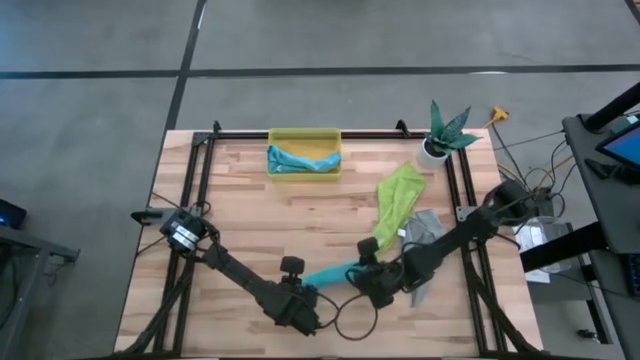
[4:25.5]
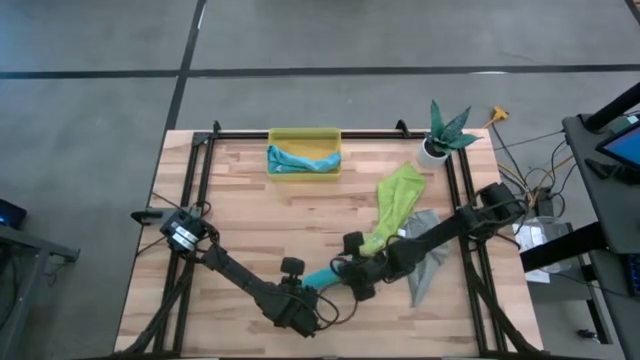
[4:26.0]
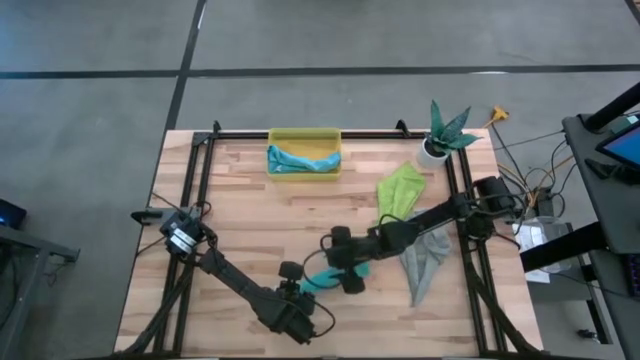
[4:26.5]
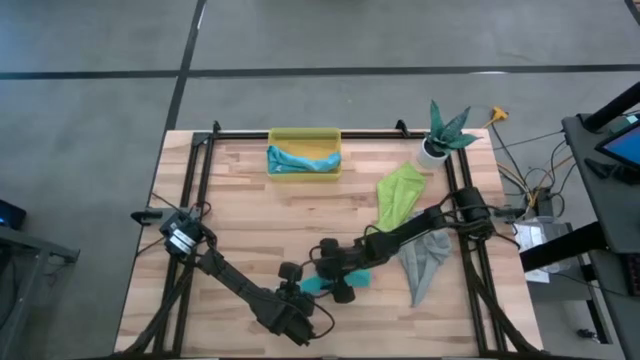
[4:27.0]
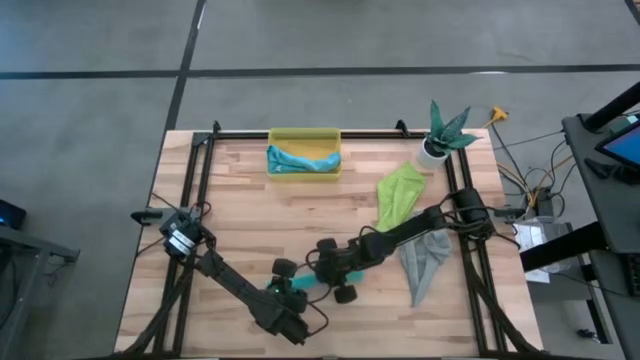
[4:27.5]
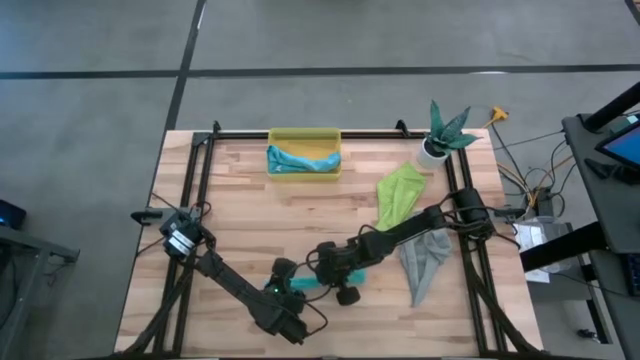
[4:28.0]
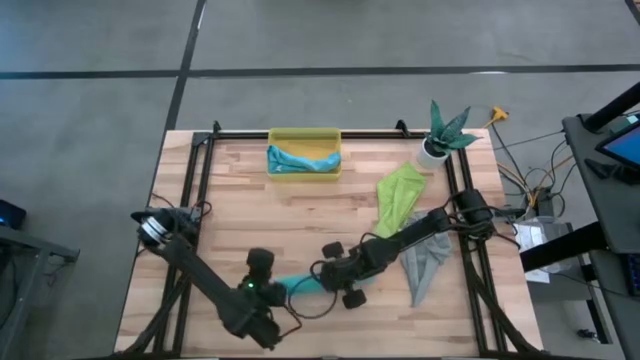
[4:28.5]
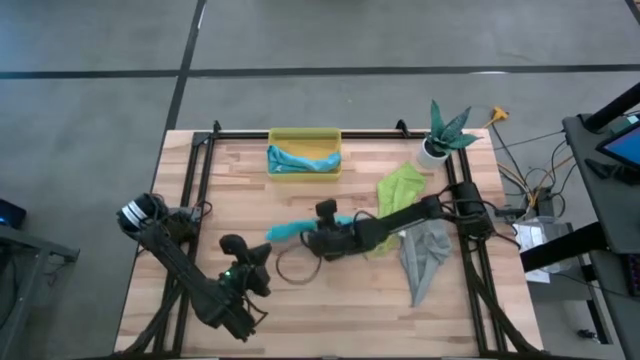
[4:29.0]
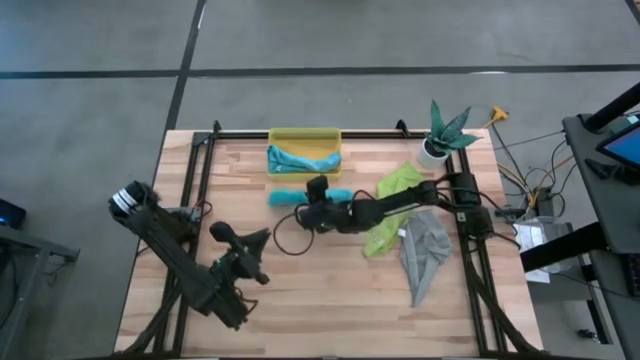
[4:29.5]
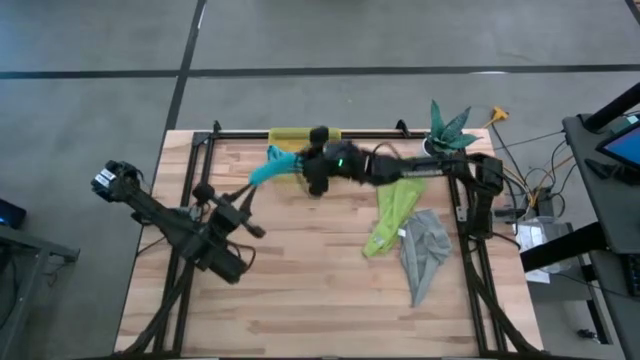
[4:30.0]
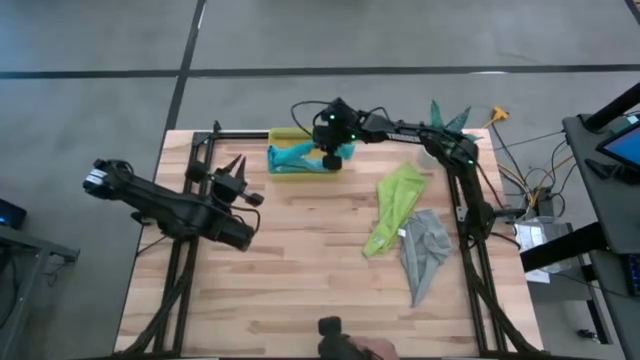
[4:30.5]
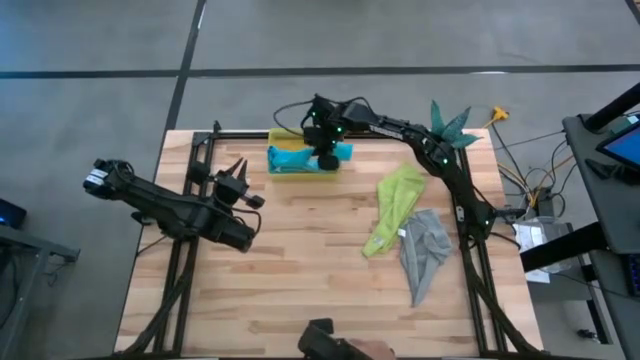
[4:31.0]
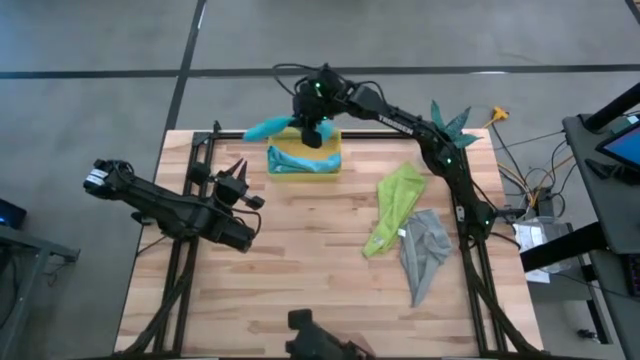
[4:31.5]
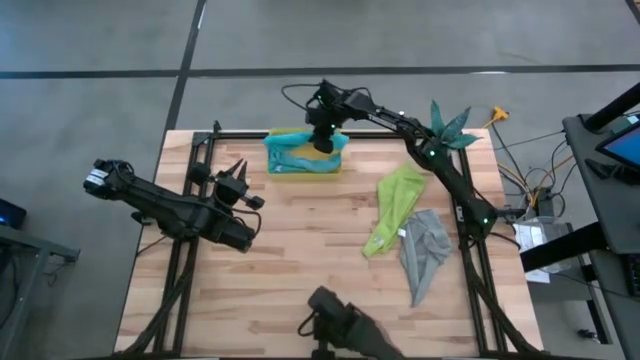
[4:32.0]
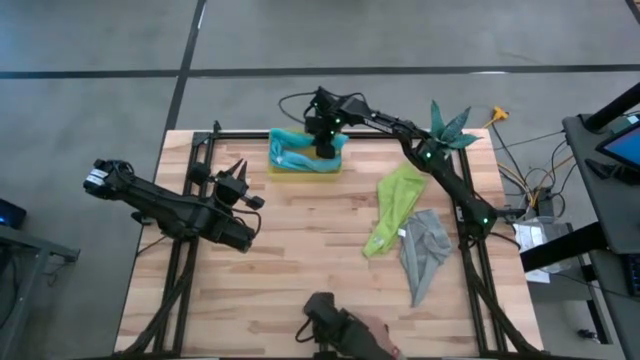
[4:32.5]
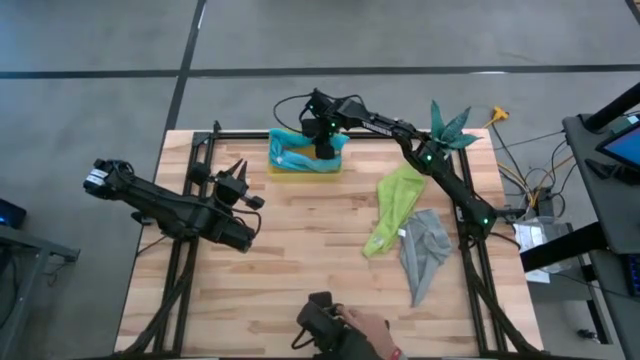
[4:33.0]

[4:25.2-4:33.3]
Task: Roll microfiber towels into tight, uniform cylinder then place into a basket
Put the rolled light blue towel into the yellow bin

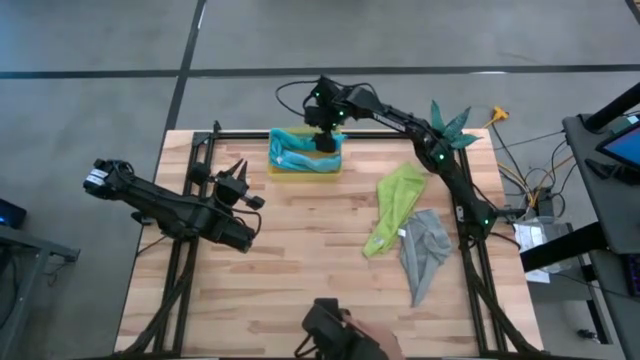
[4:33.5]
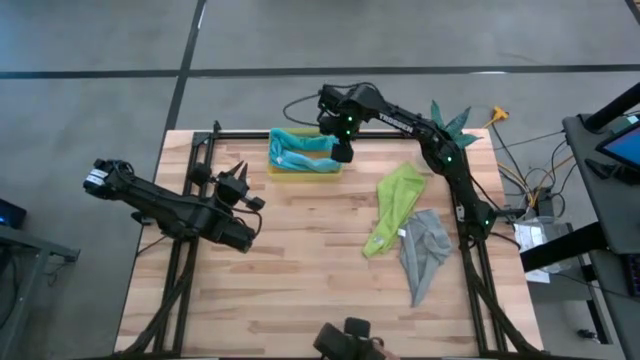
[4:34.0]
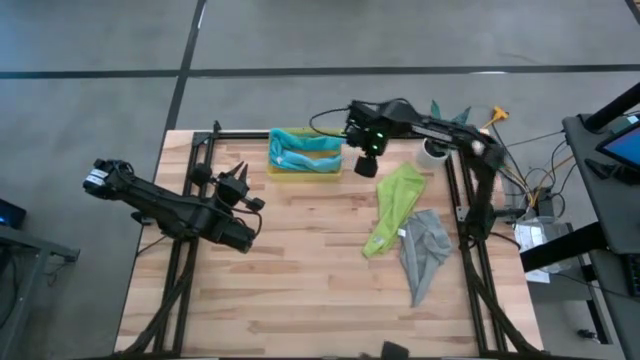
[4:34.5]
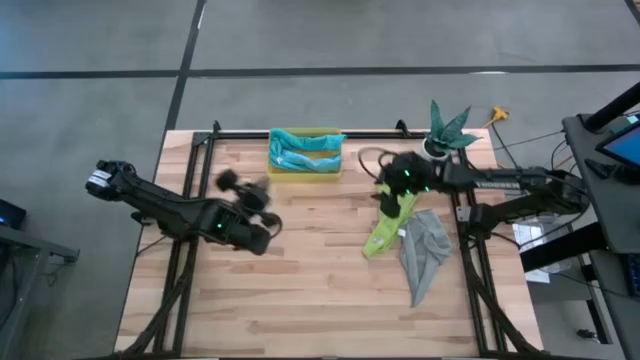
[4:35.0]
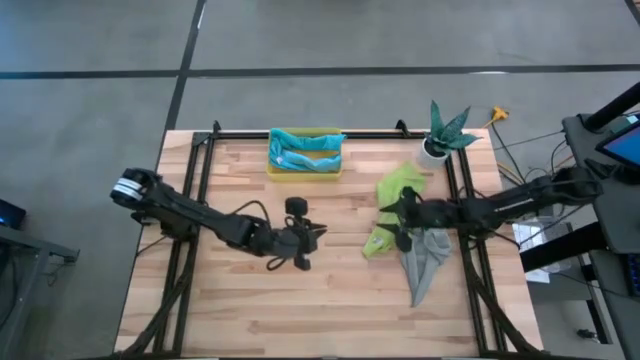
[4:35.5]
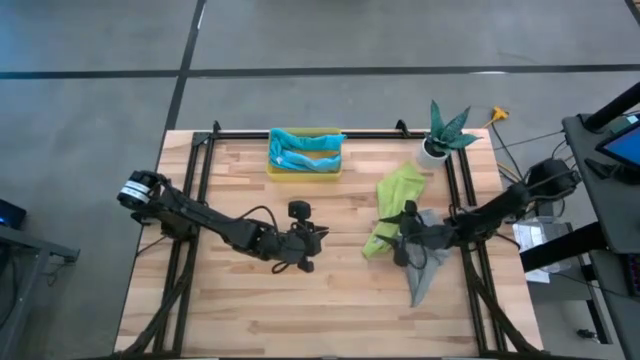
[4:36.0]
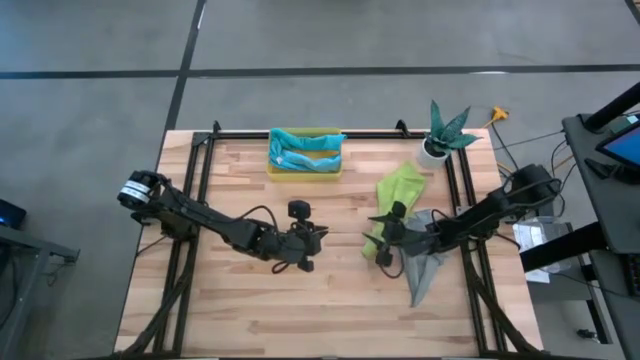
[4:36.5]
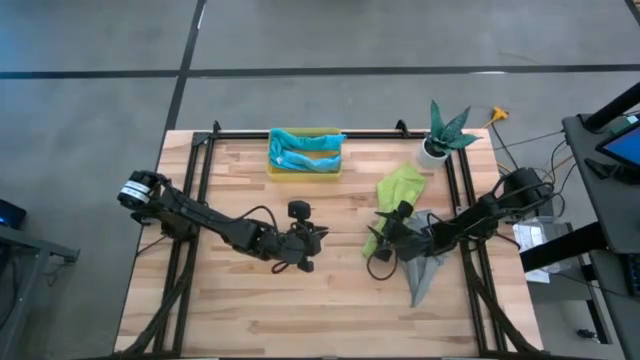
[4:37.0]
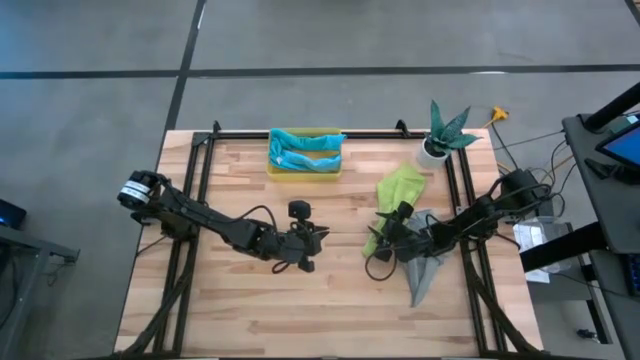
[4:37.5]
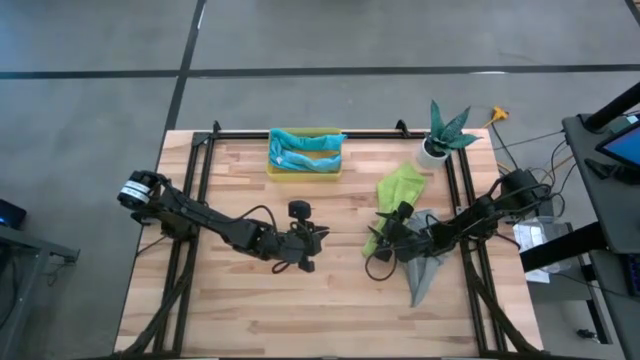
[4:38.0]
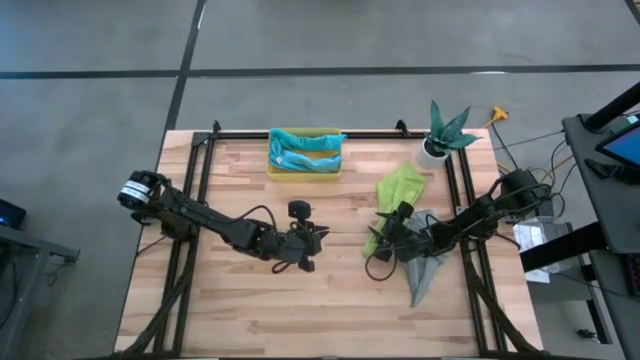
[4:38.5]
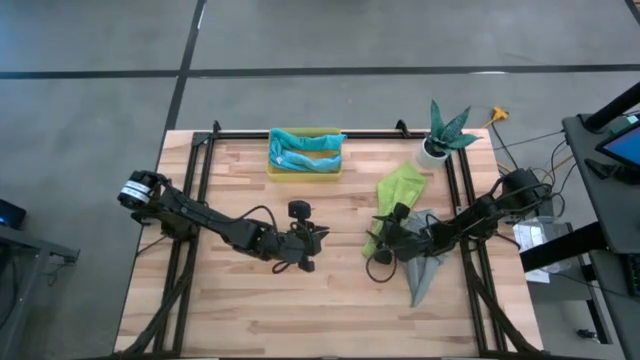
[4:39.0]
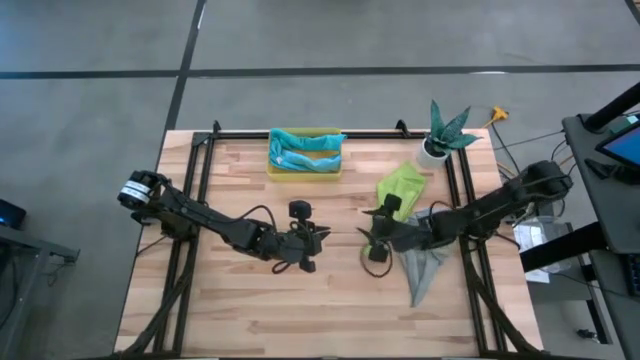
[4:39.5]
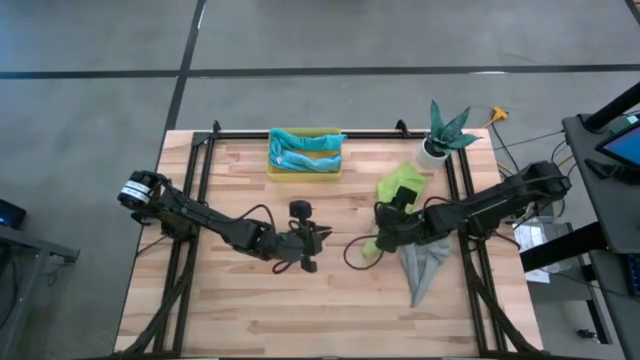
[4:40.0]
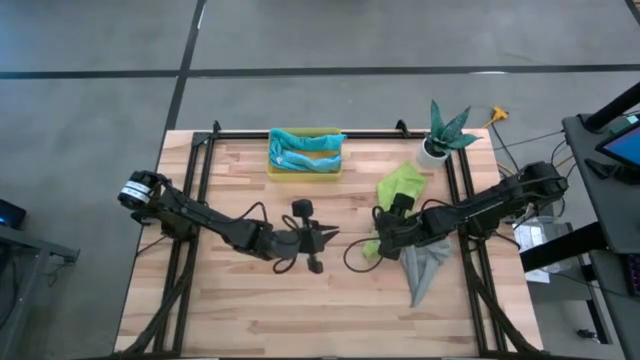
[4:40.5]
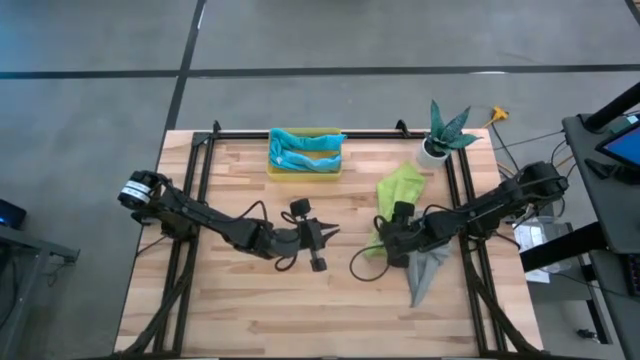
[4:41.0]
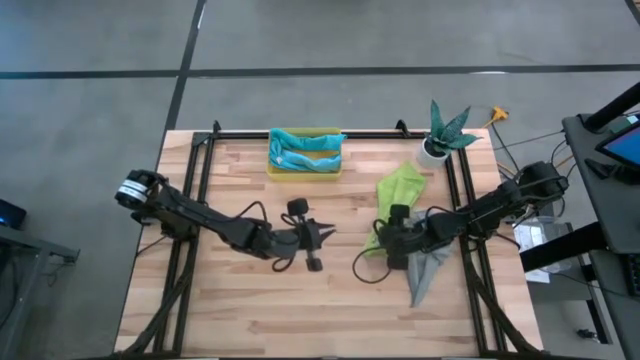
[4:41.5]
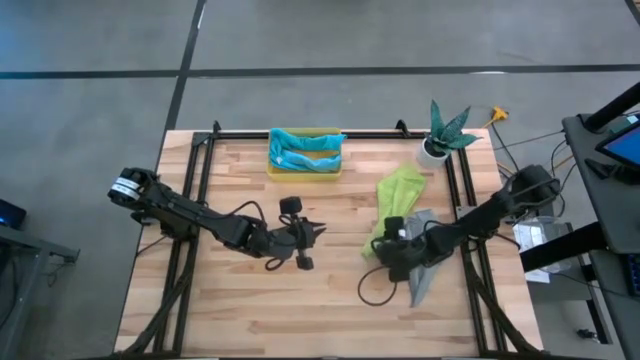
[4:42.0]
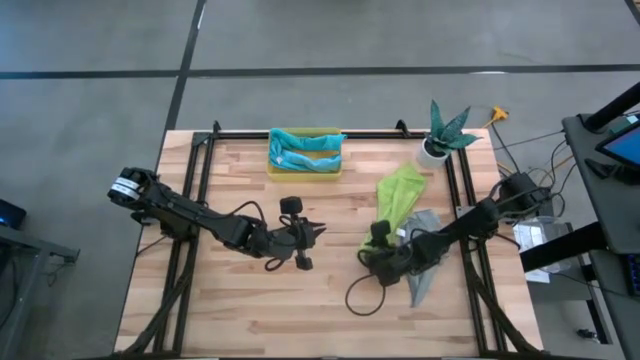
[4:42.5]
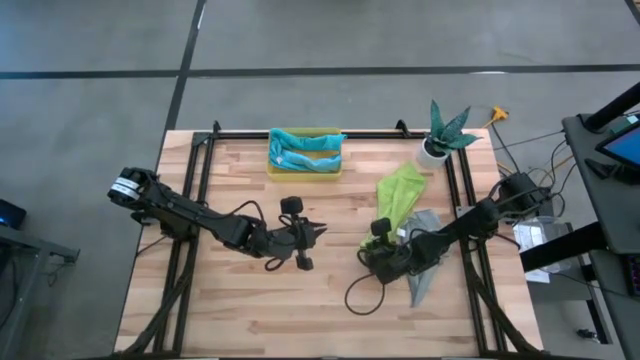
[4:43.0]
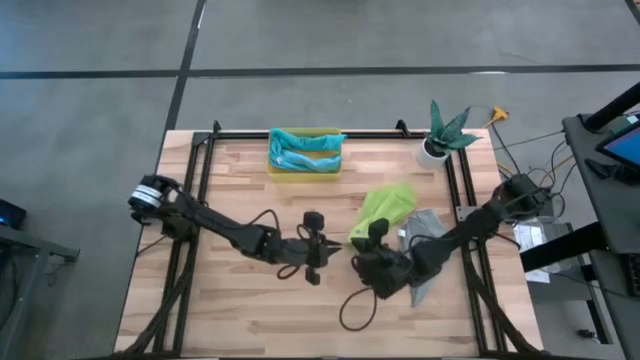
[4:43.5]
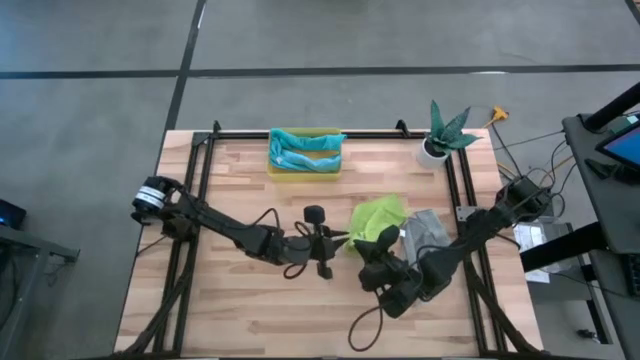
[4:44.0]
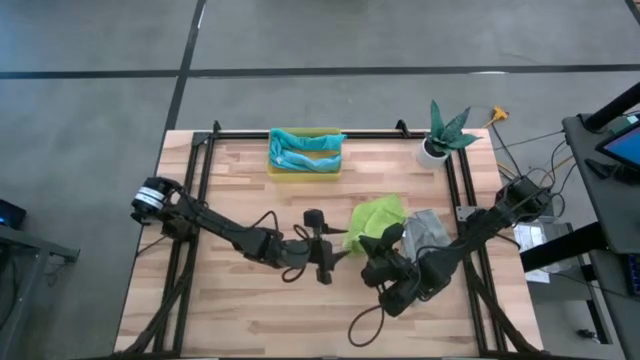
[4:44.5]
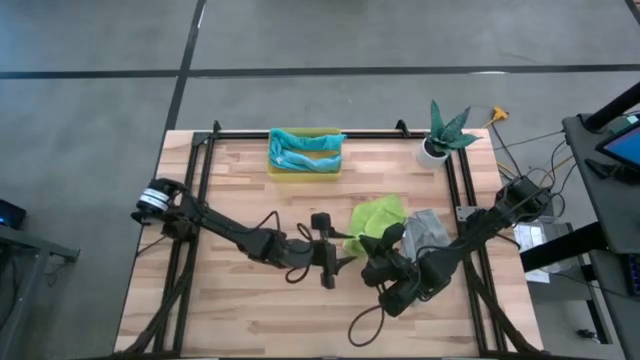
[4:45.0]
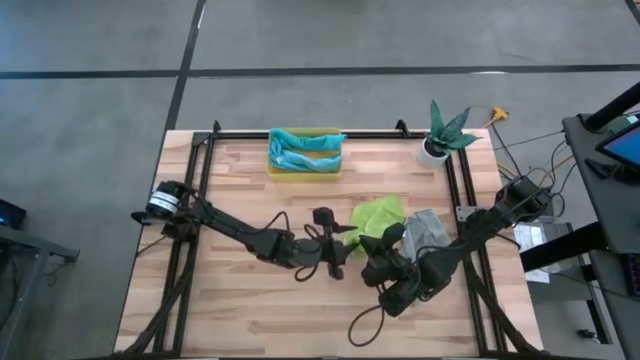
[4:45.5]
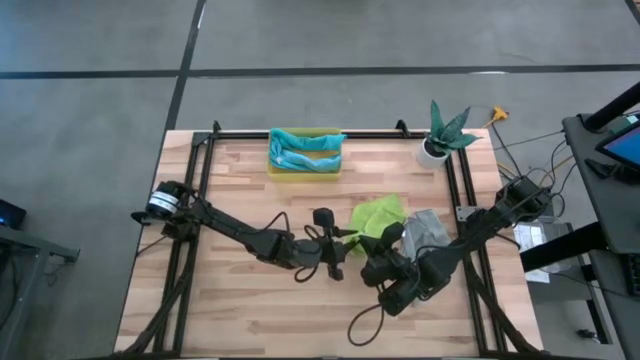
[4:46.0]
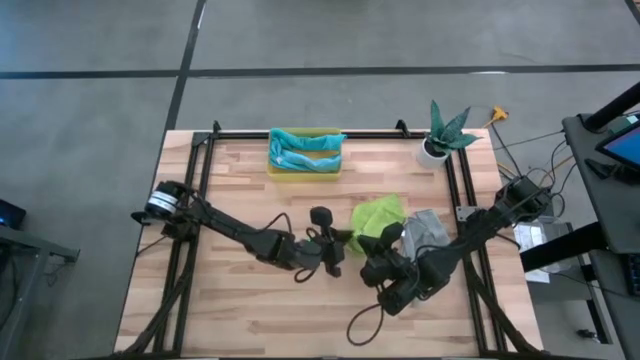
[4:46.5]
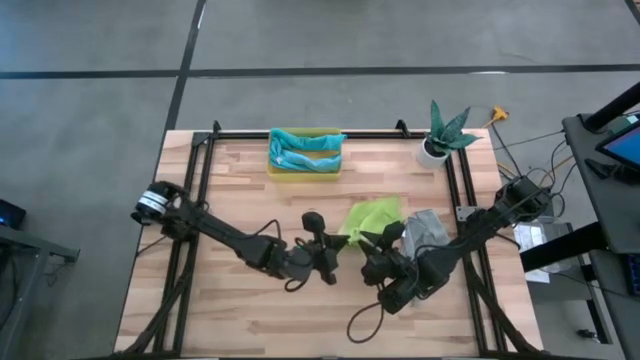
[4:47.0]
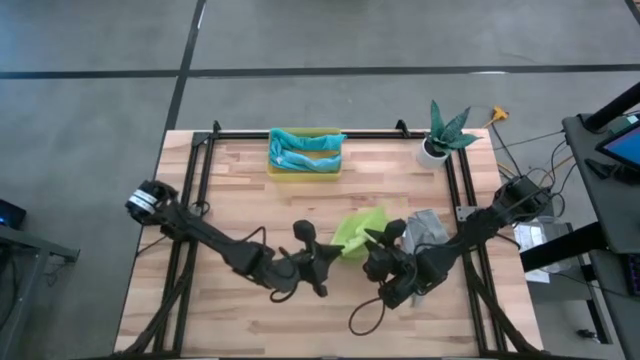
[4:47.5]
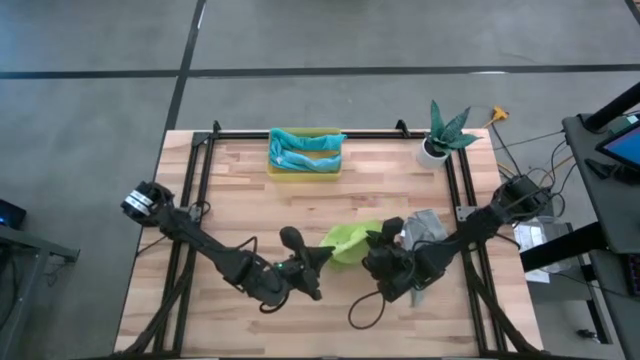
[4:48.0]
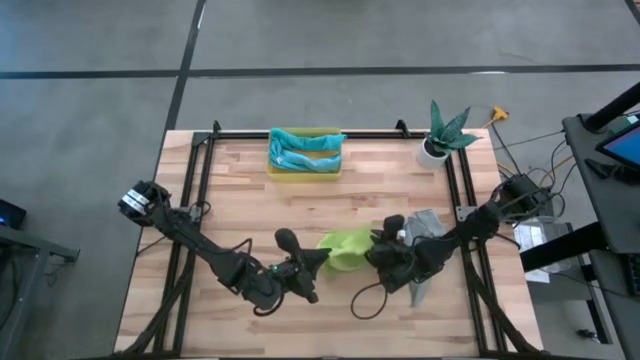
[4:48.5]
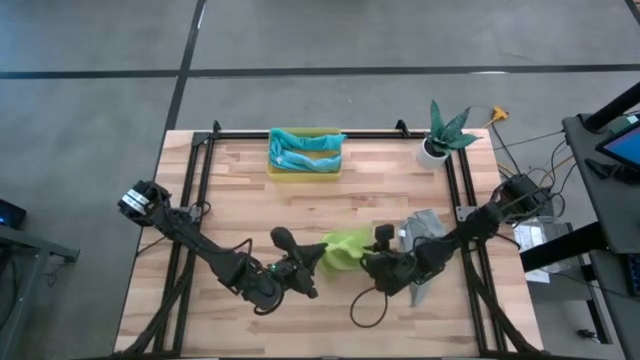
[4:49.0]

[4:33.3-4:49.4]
Roll the green towel
